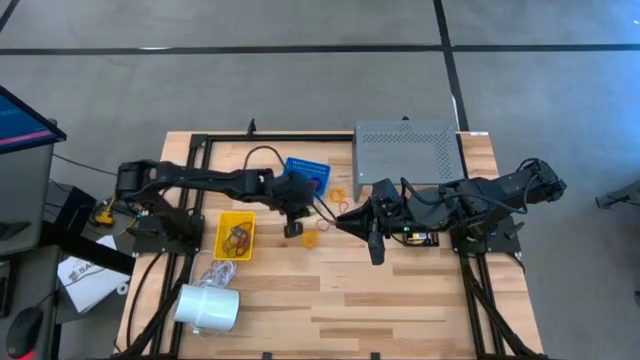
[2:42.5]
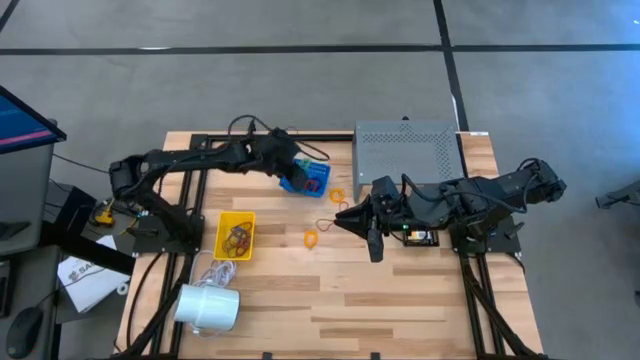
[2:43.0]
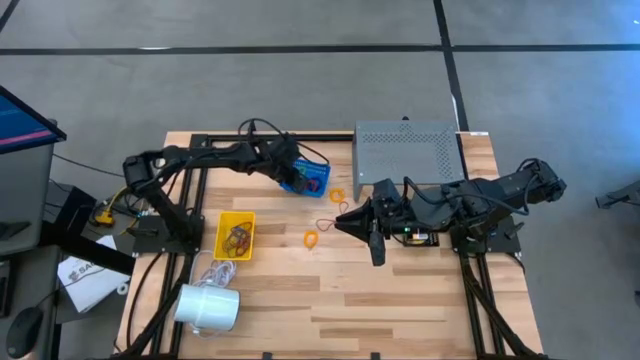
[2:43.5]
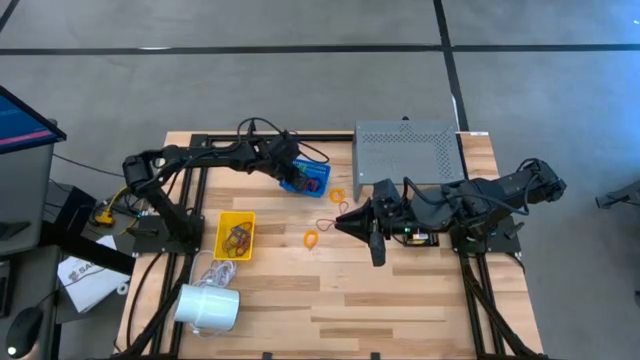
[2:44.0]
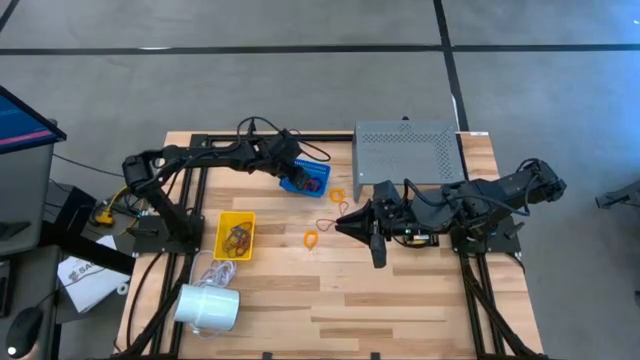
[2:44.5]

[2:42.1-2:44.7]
Task: Pick & Place Office Desk Supplies
Put the green spring keychain into the blue bin

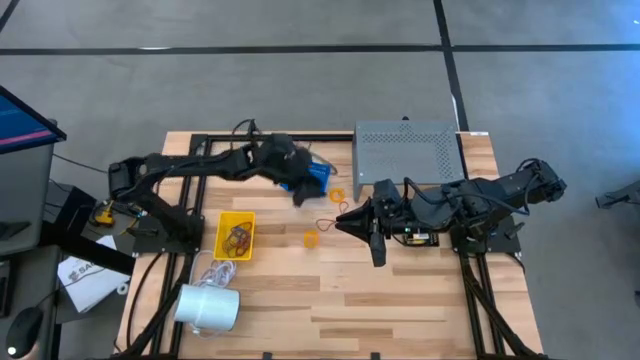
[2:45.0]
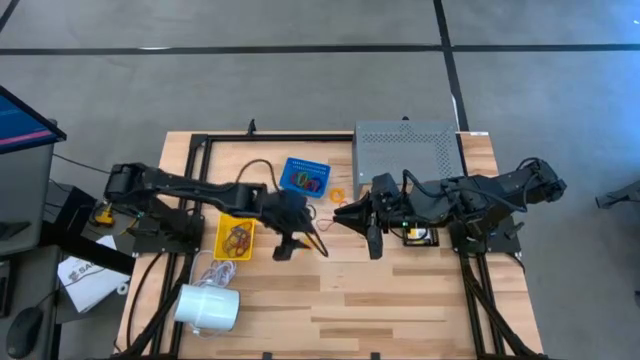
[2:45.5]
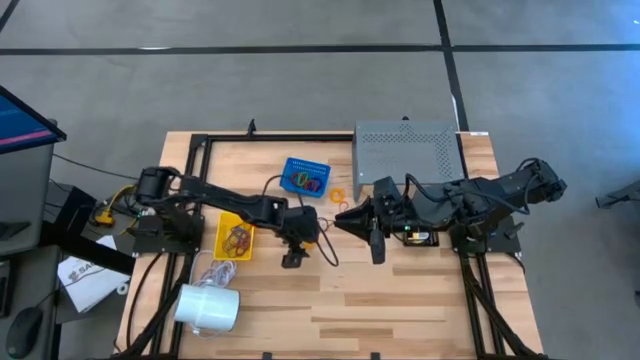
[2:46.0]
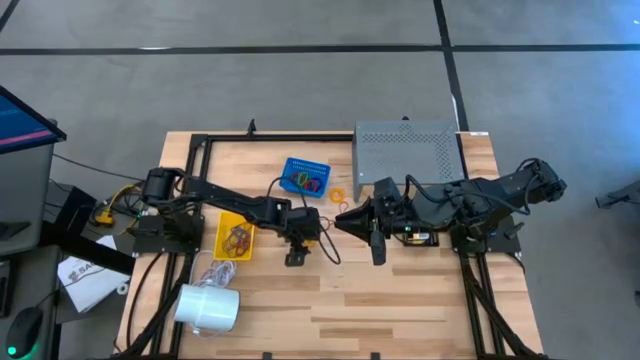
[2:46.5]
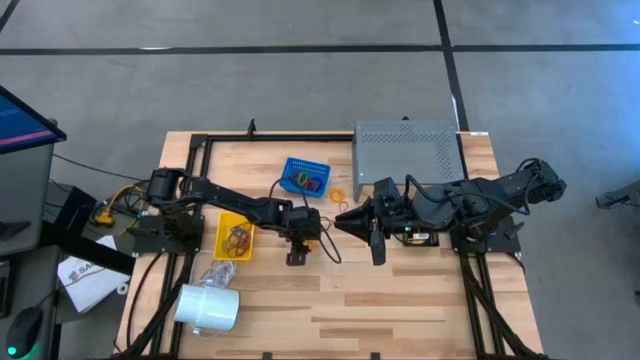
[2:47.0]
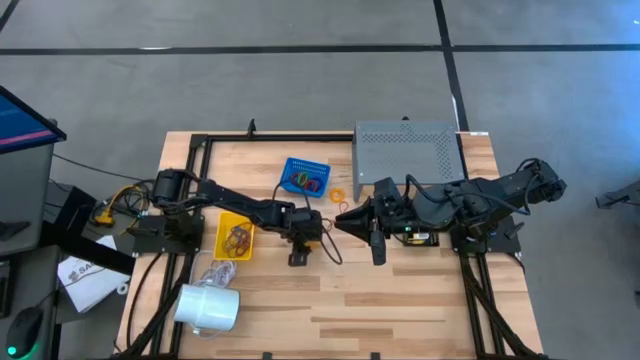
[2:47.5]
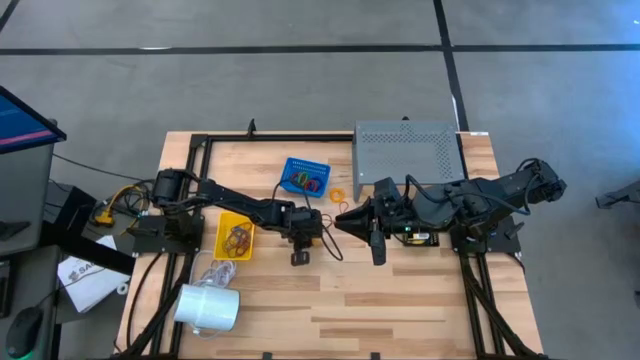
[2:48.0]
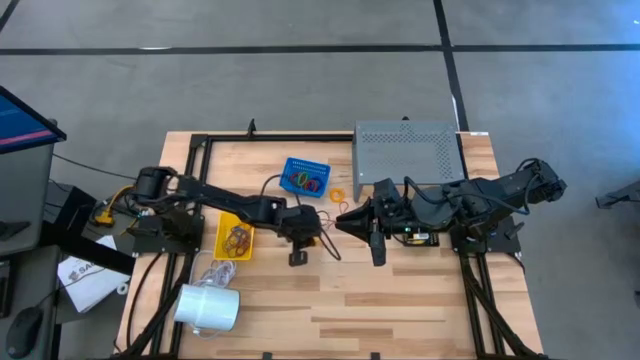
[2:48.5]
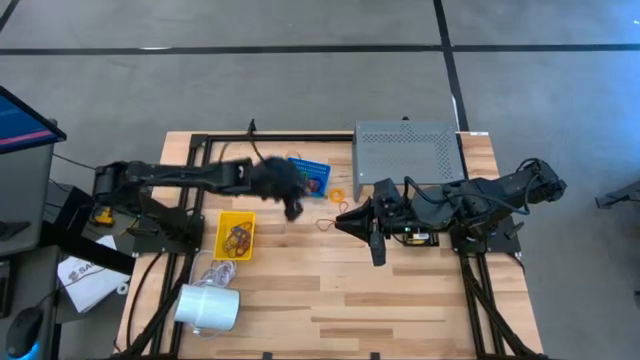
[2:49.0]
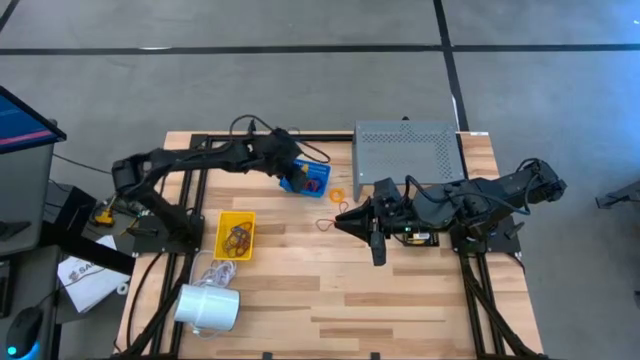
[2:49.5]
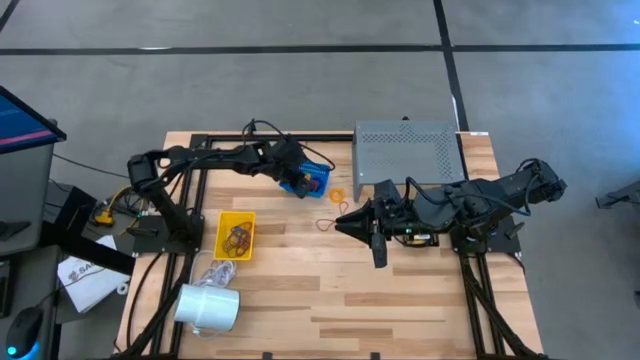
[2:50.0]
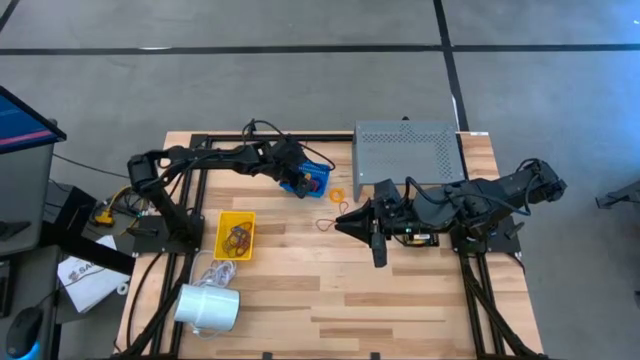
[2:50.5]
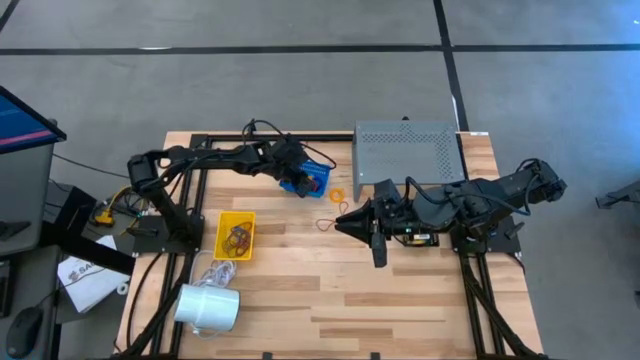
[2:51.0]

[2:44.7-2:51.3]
Put the yellow spring keychain into the blue bin

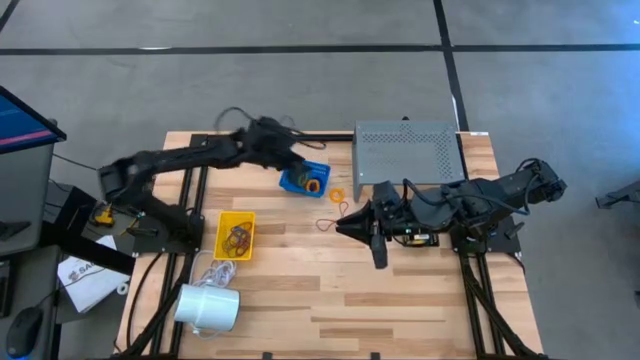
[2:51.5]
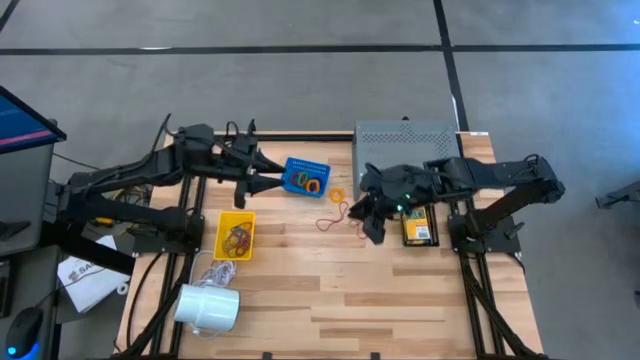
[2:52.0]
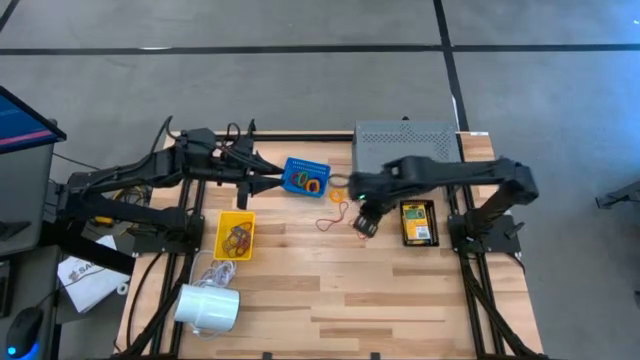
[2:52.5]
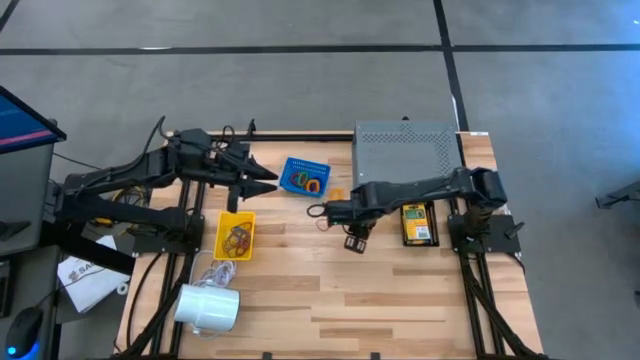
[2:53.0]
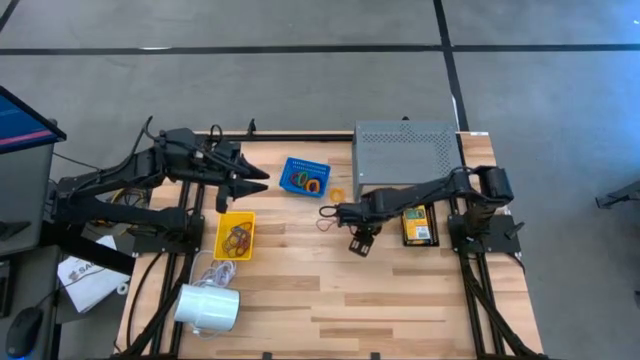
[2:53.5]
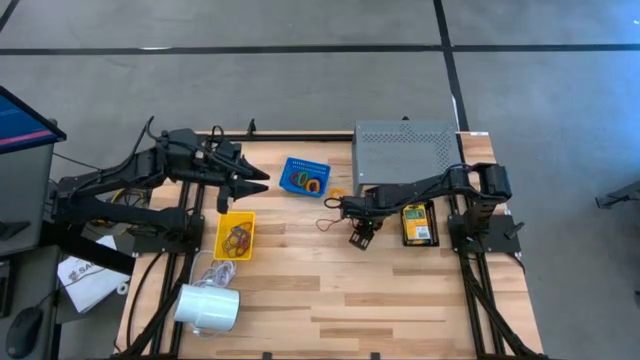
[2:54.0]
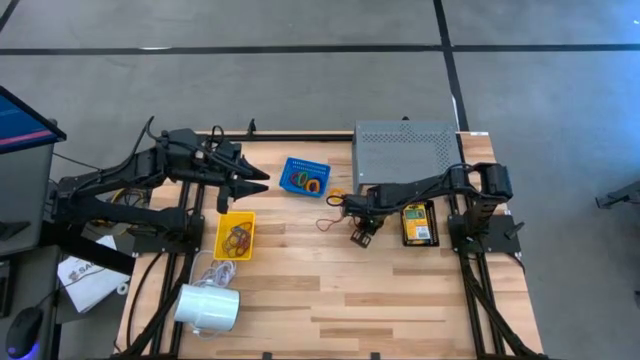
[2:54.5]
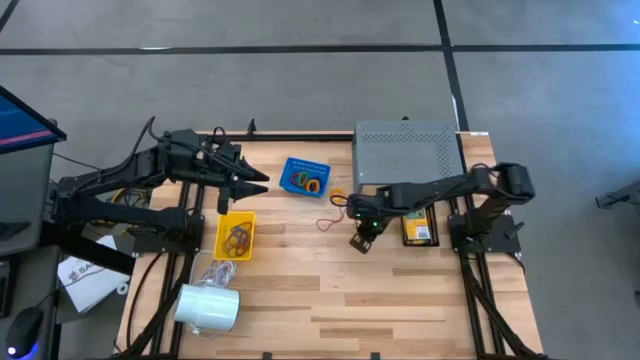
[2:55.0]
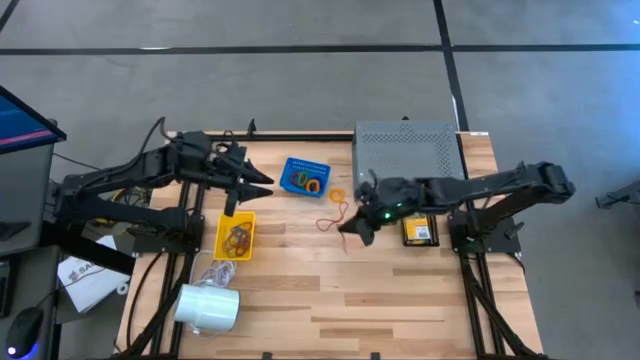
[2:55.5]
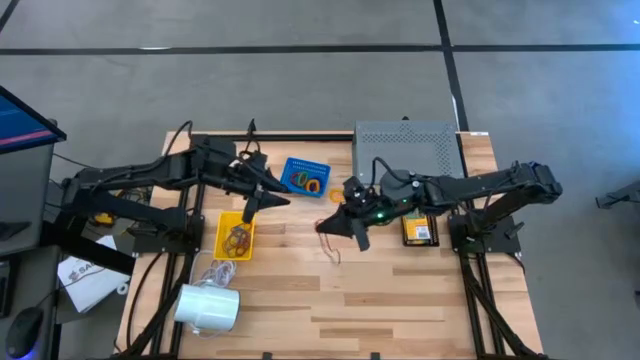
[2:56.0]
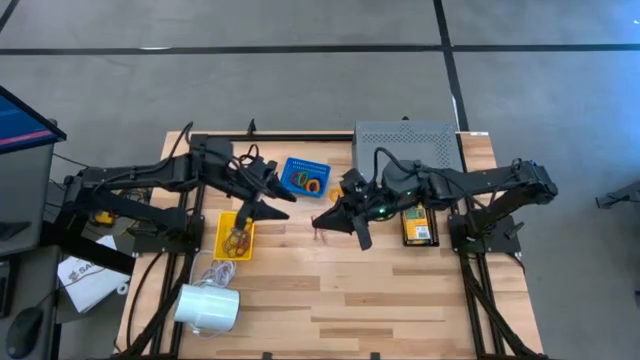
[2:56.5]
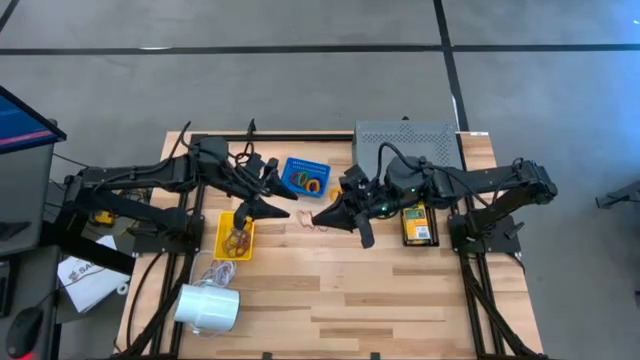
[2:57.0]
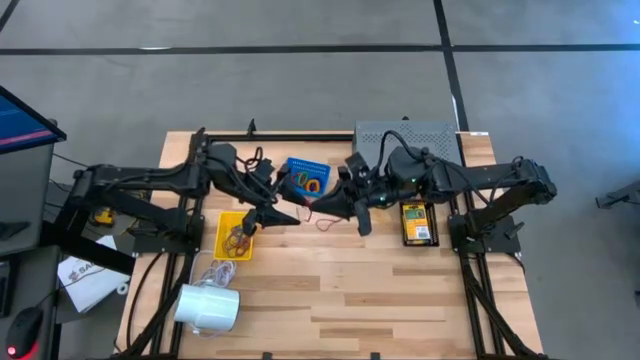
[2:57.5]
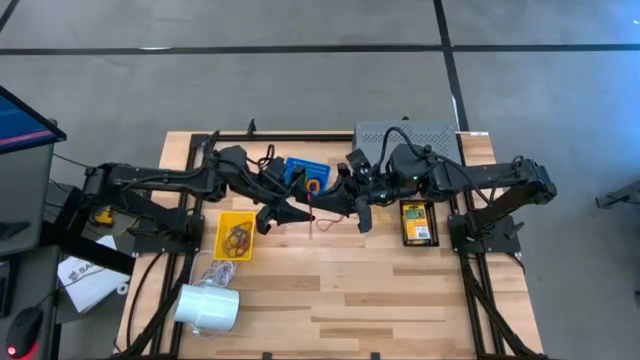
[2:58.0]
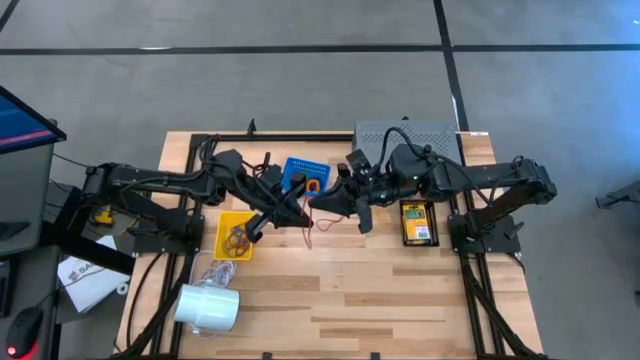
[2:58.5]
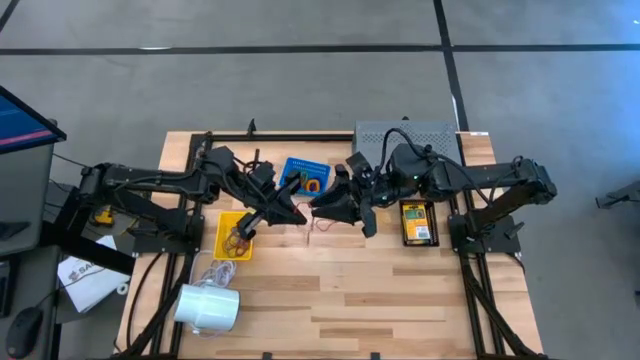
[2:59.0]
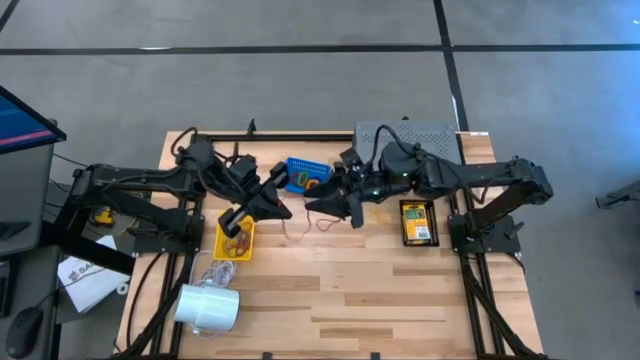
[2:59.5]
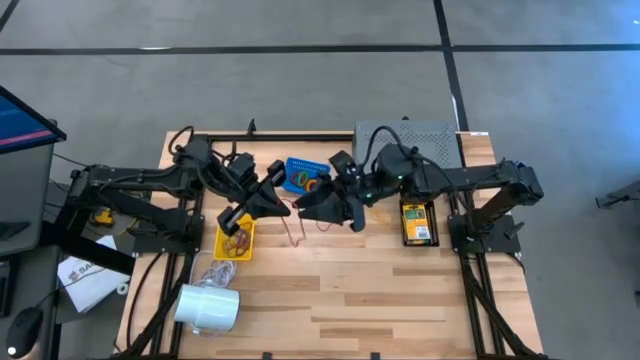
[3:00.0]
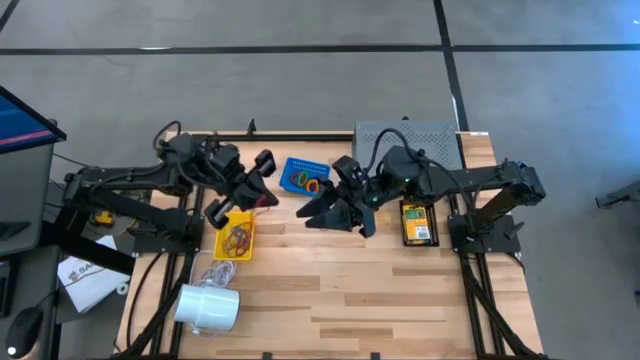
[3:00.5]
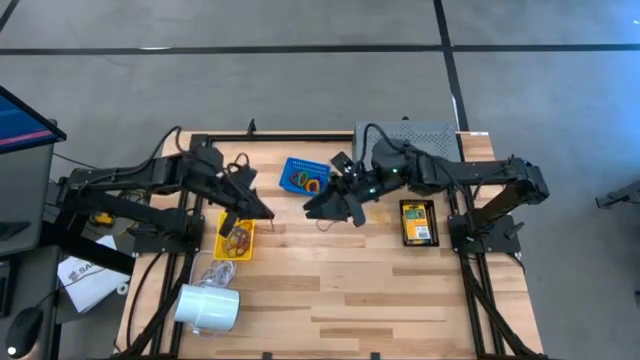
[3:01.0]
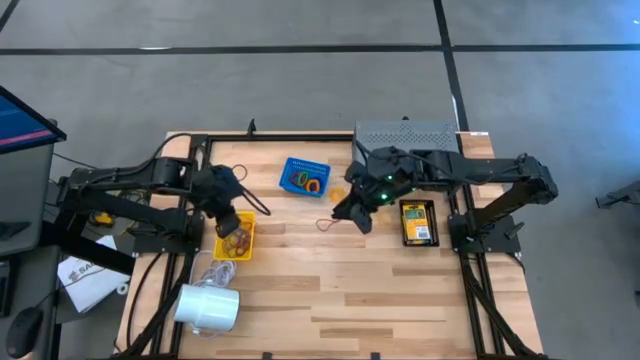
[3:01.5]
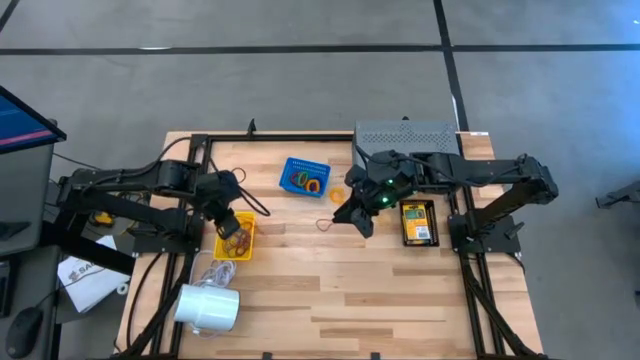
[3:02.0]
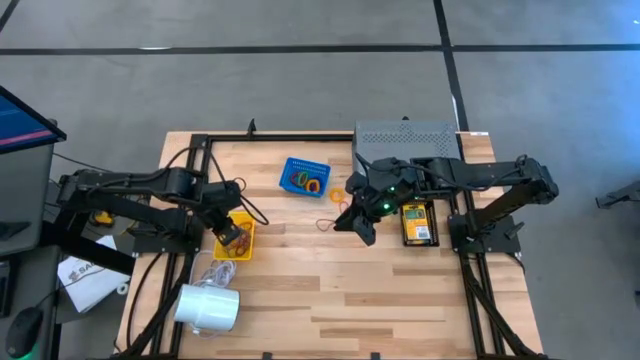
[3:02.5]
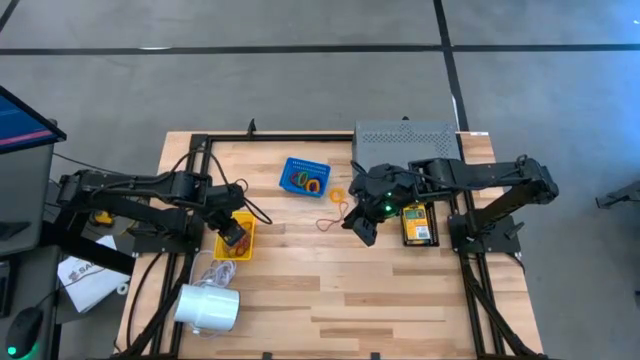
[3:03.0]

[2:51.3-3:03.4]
Put the red rubber band into the yellow bin
